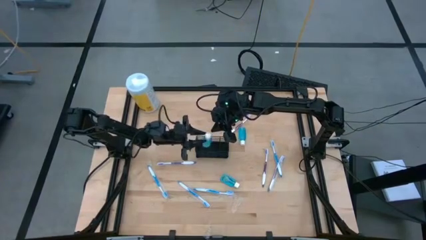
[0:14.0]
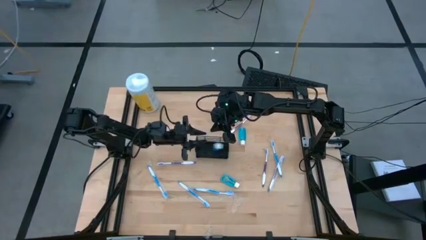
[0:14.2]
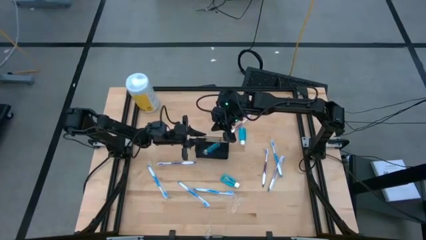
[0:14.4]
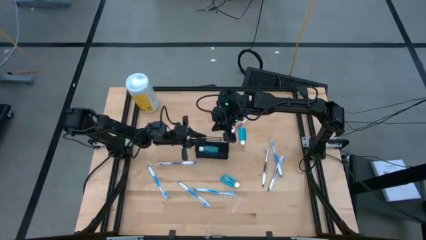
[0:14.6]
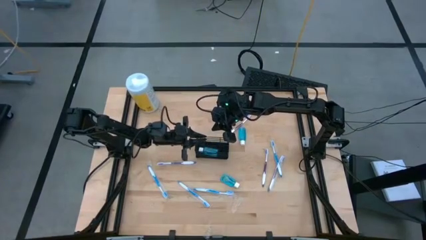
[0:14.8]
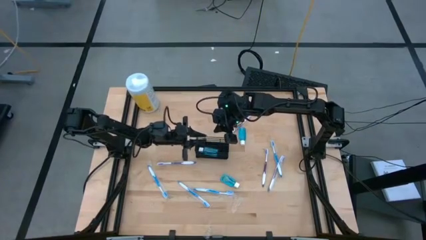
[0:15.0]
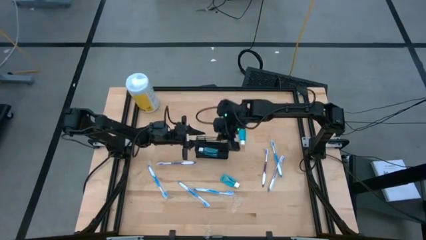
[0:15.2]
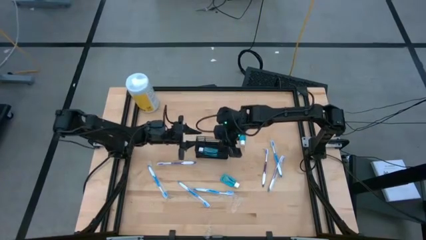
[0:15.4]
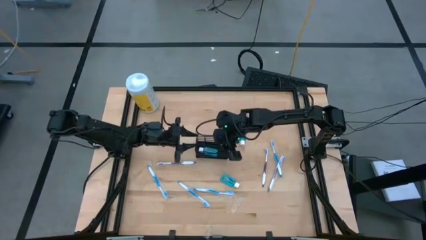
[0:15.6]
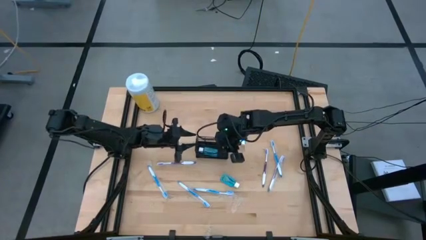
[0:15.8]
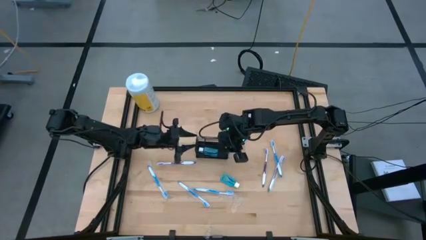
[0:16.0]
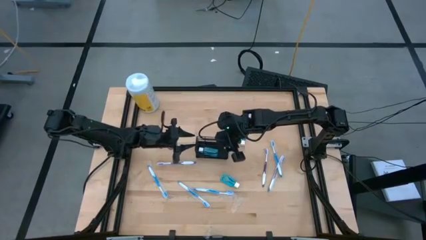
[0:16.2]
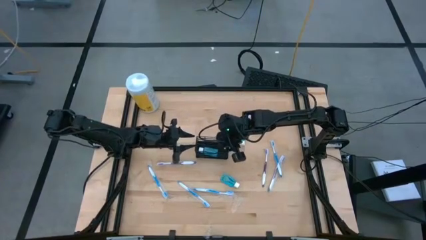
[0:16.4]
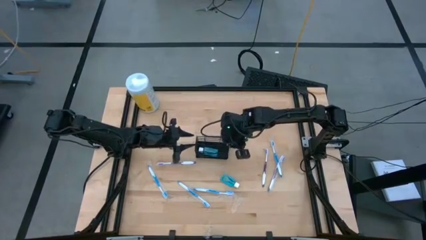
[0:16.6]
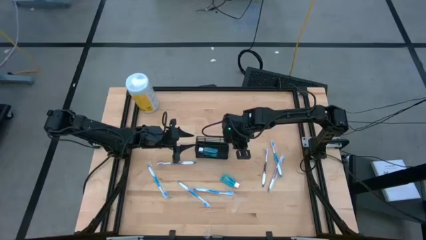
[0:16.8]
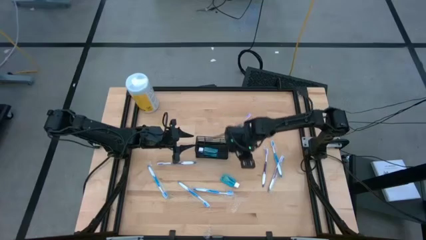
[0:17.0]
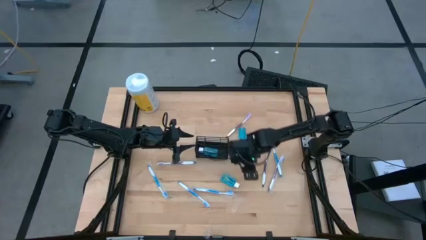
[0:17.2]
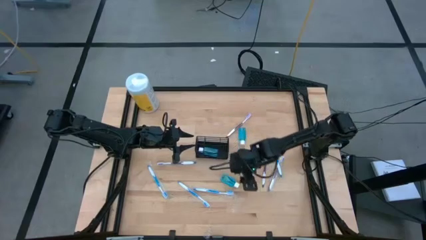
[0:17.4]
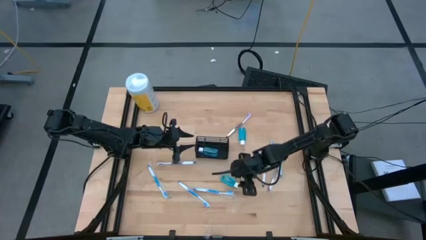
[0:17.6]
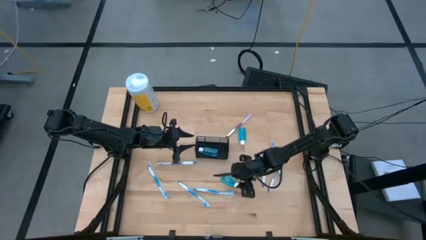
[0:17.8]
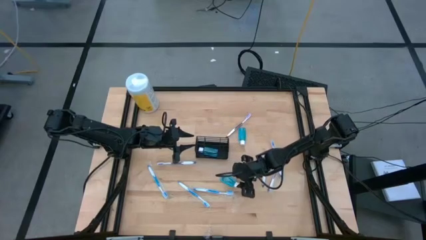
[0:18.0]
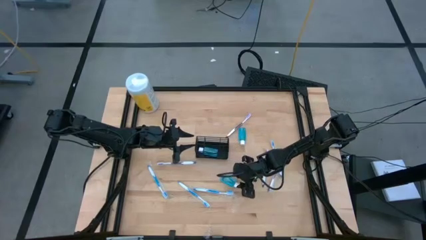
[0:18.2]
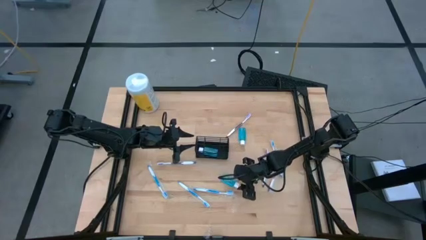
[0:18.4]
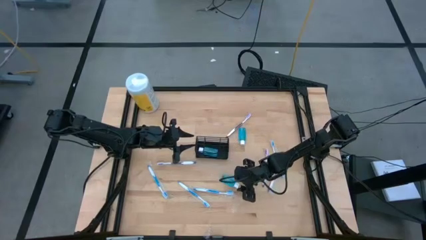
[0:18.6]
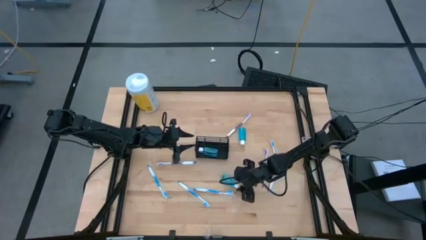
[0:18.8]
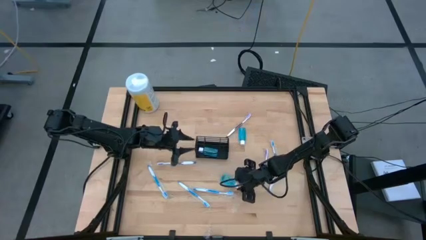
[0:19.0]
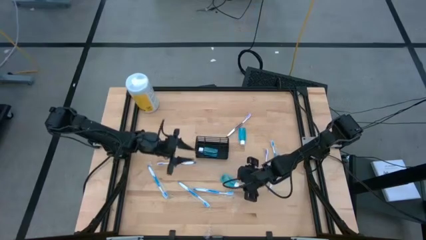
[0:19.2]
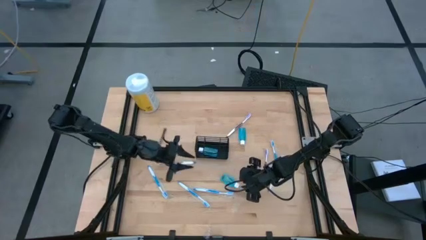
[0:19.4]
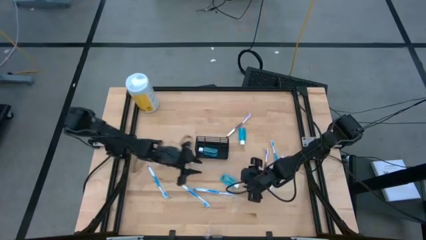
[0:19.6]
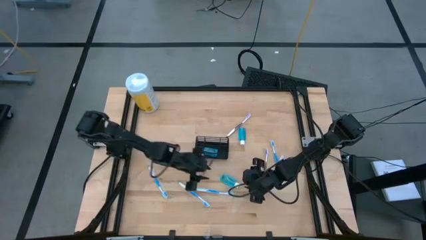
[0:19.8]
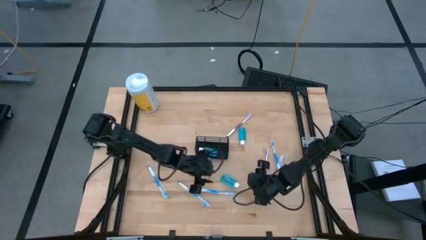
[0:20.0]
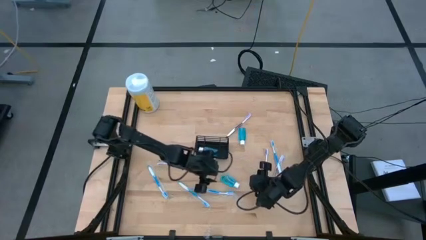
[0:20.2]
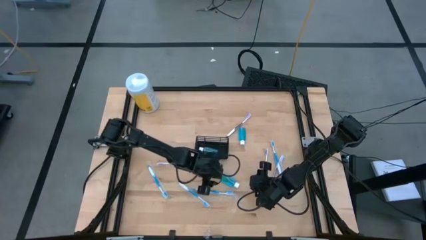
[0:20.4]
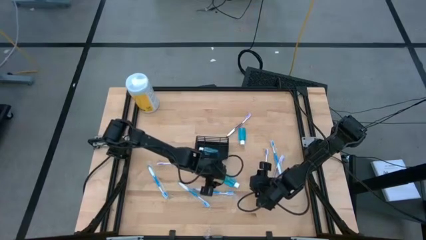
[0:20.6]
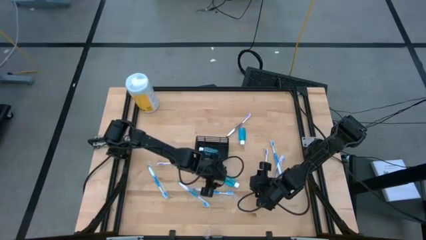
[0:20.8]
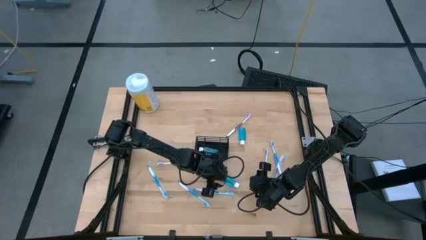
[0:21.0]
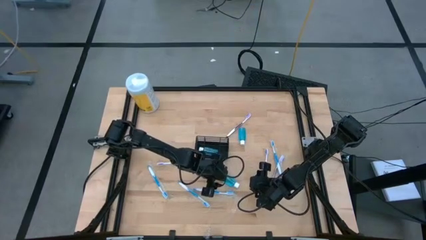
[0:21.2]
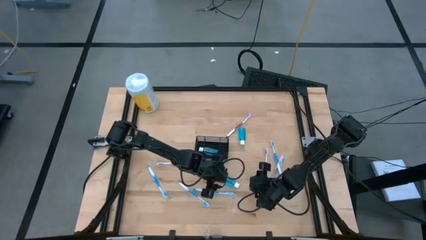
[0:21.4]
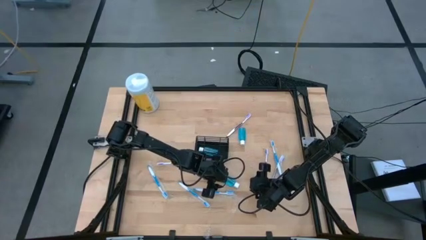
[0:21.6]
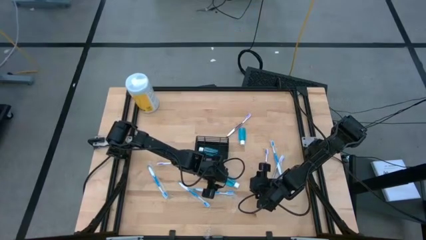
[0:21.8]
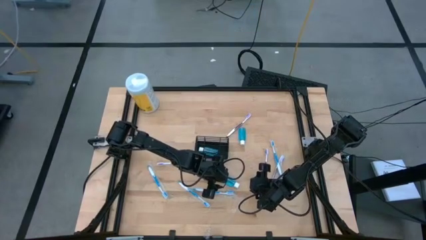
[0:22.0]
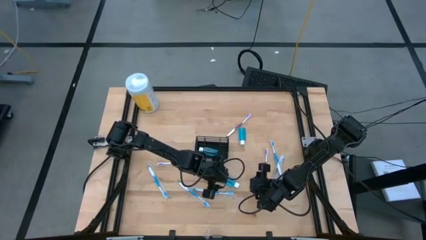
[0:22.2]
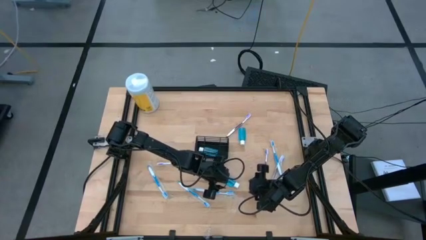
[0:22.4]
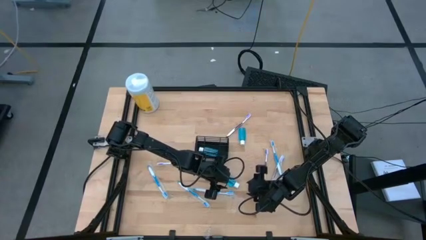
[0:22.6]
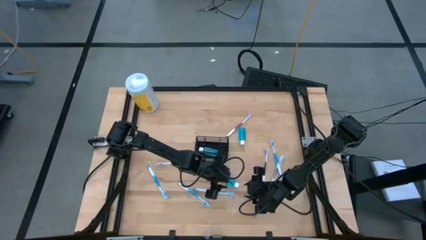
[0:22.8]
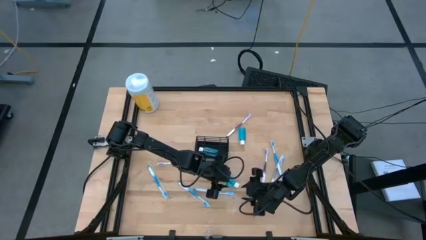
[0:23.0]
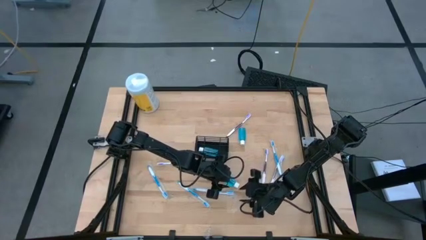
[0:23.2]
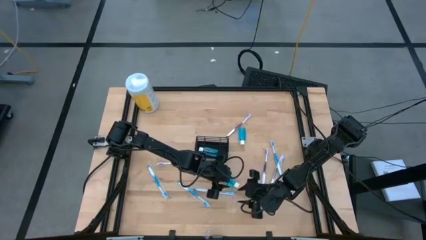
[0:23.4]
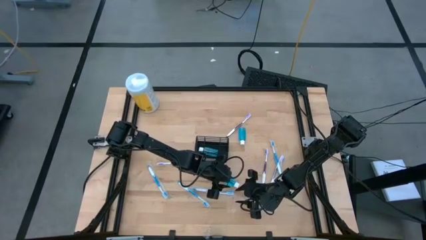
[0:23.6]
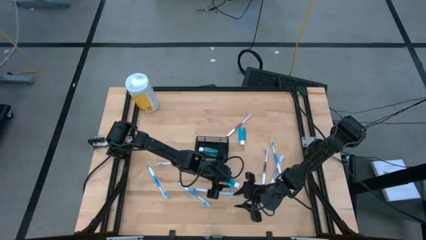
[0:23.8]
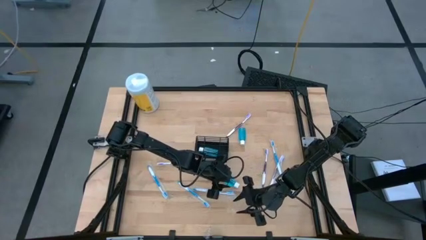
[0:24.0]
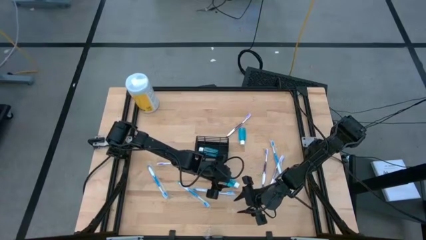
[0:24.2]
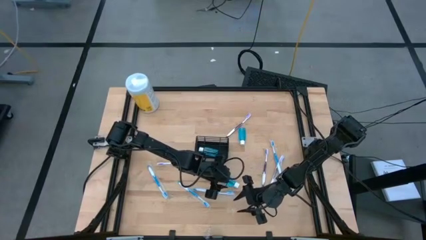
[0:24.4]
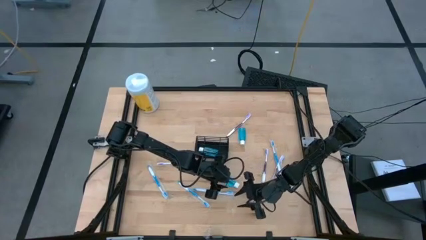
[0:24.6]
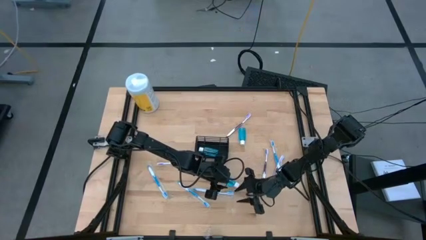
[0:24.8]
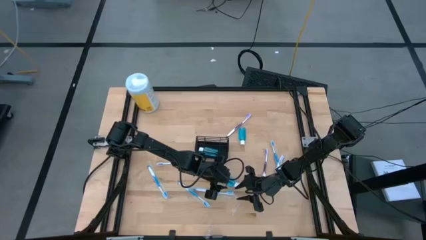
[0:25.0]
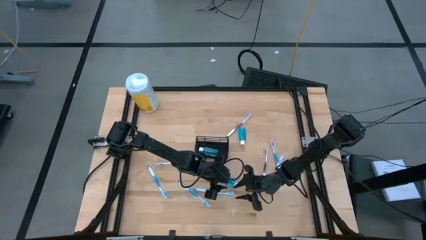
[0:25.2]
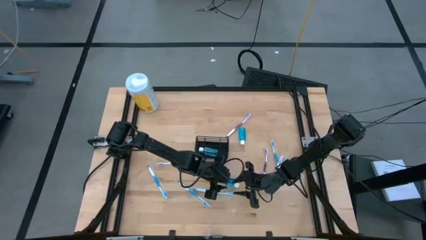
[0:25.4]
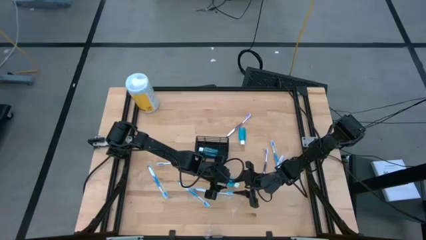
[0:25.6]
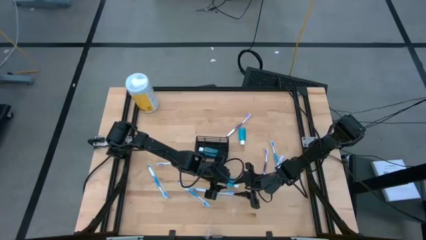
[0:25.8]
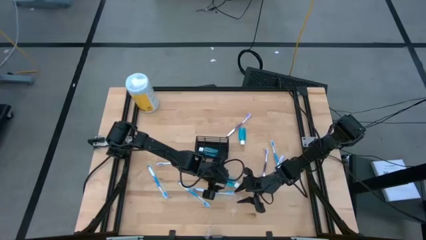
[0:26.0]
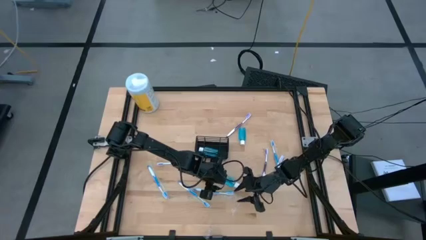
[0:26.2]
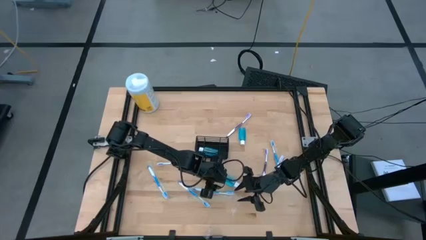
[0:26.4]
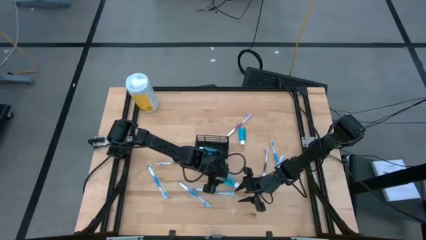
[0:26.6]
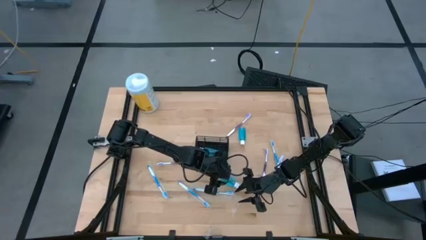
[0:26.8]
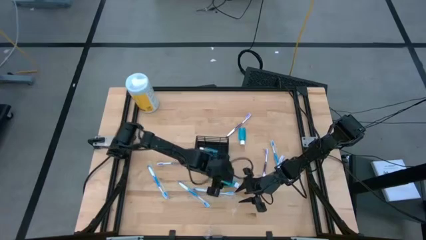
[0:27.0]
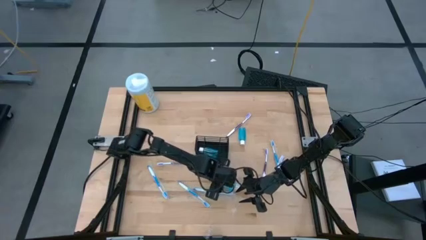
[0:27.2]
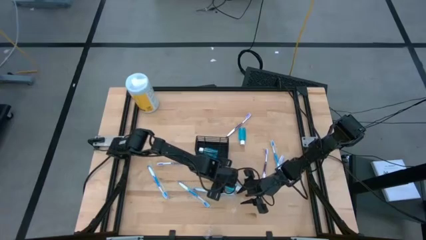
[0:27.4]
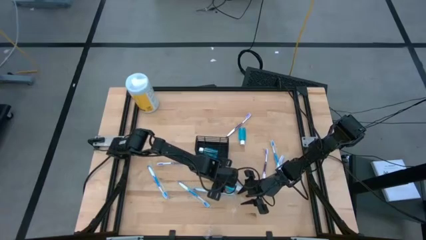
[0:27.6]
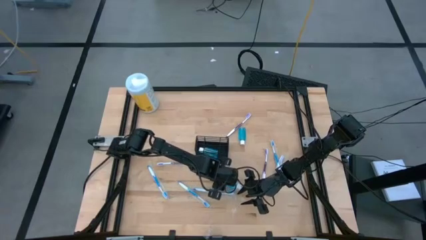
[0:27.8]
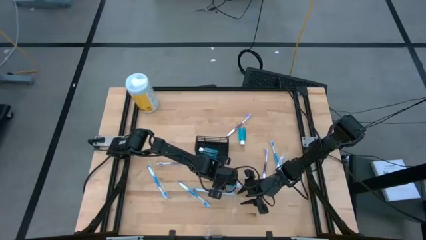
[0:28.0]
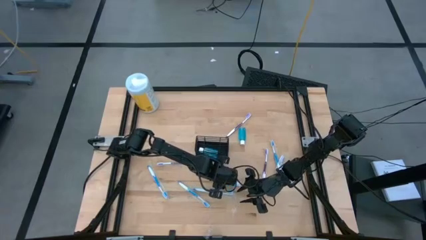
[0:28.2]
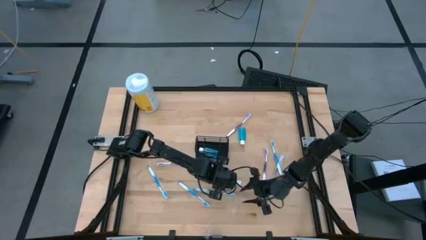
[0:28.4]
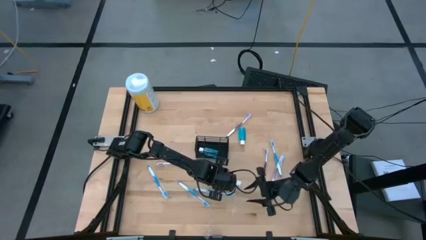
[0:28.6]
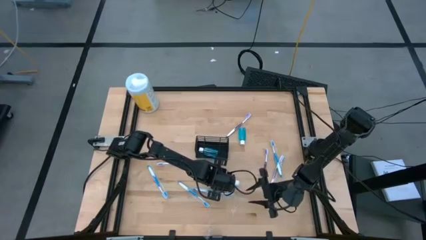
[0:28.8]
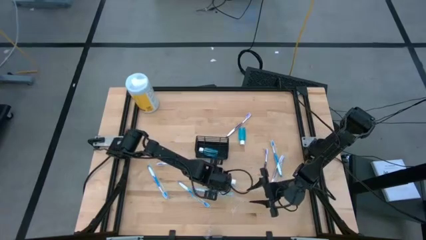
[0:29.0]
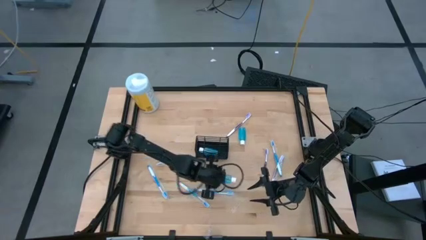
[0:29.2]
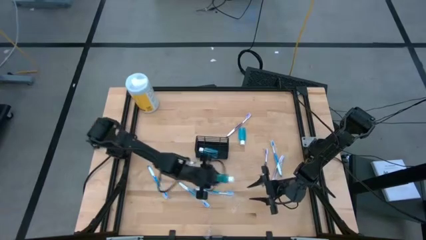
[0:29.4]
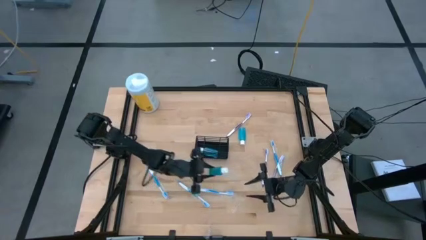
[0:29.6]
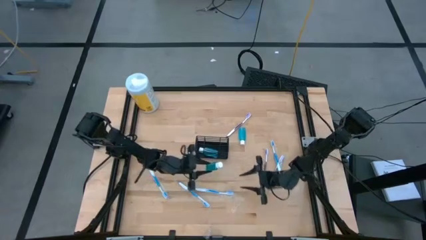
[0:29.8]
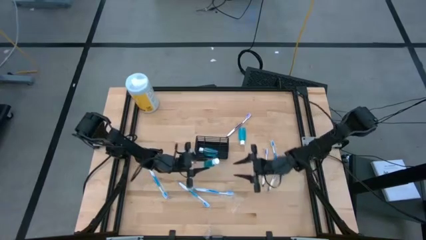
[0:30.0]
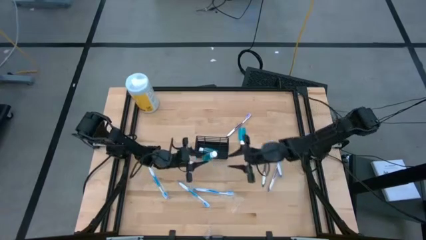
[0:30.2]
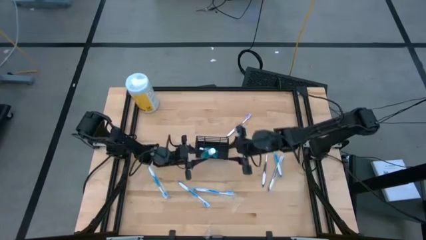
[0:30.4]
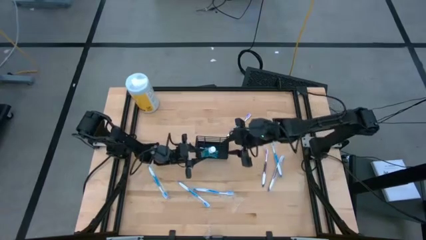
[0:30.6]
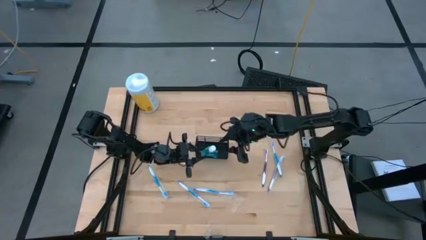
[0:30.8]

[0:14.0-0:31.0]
Task: Pick & Place toothbrushing station
Put the blue mouthwash into the wire organizer
